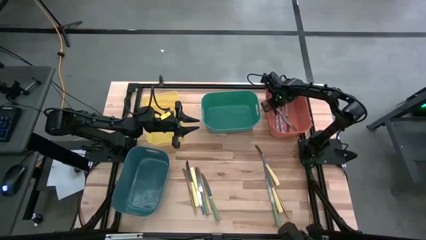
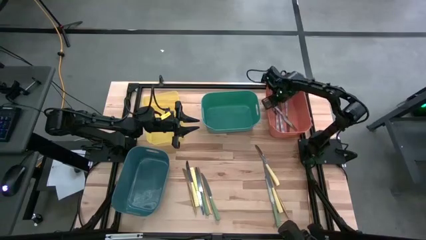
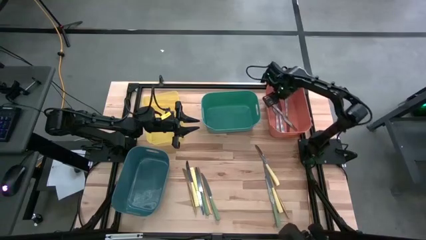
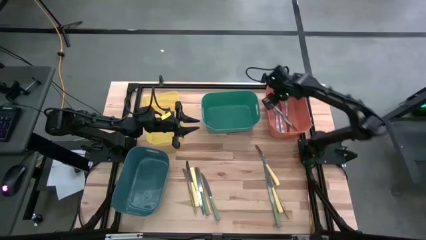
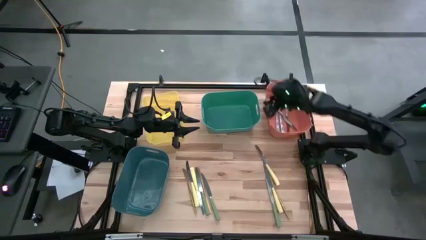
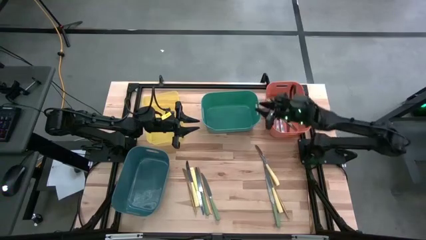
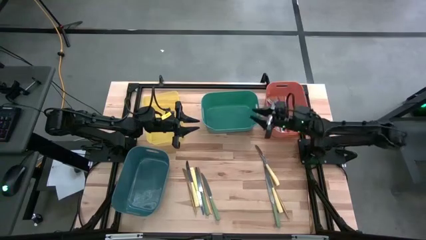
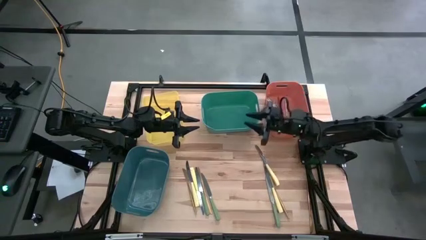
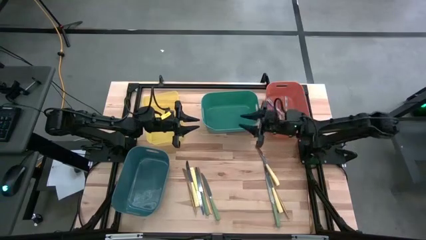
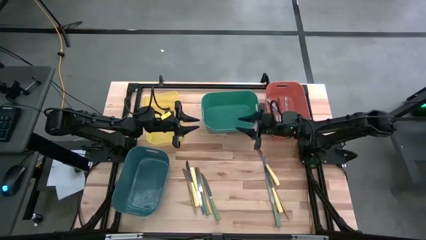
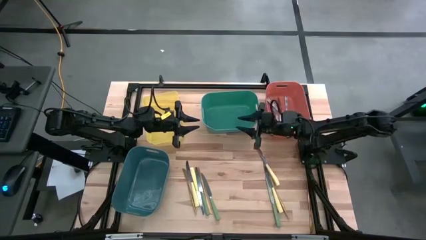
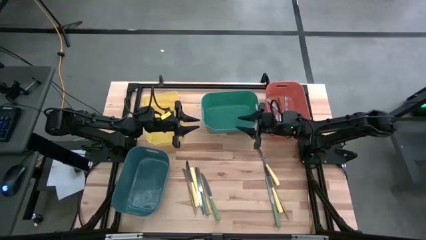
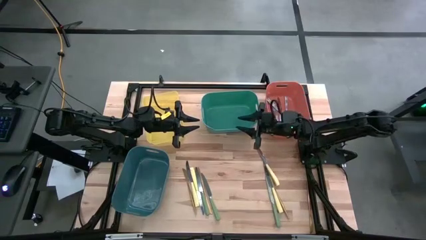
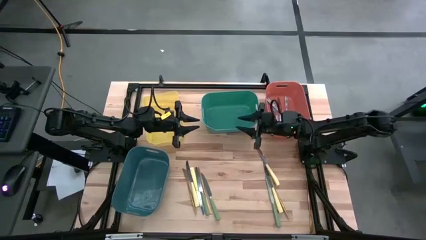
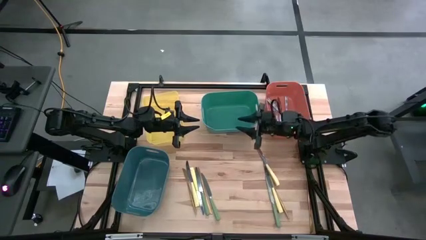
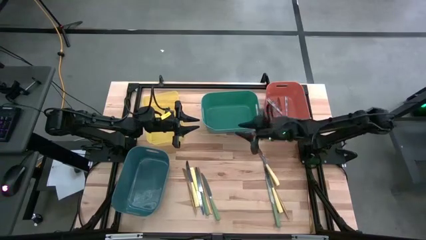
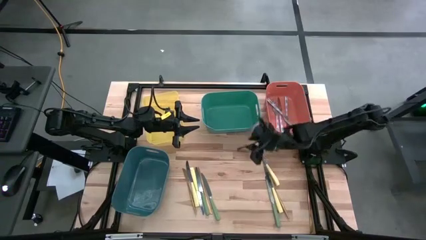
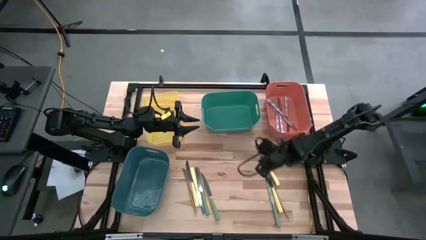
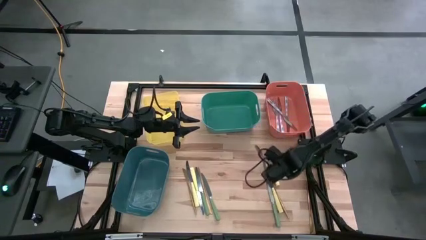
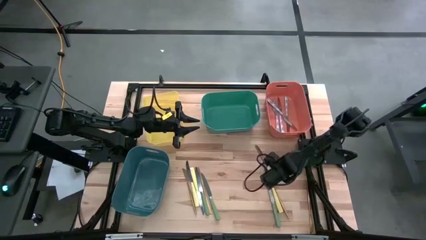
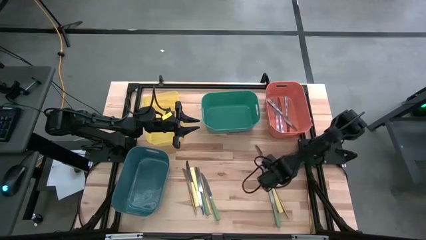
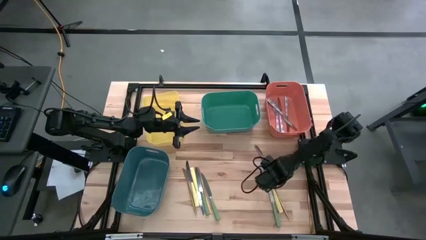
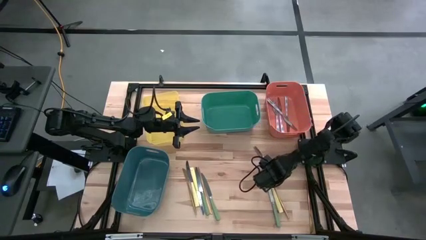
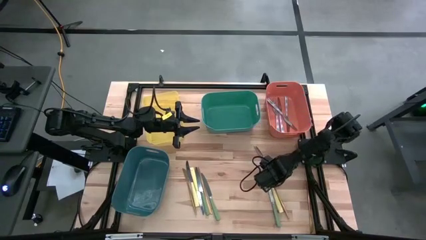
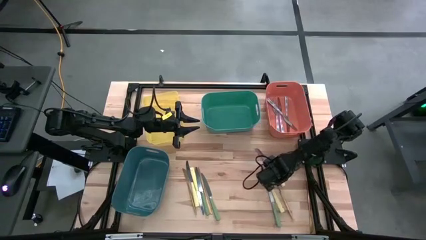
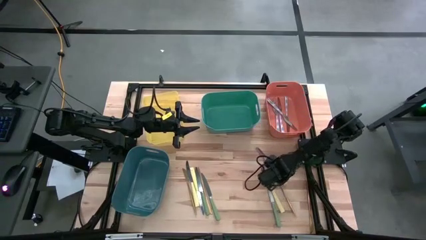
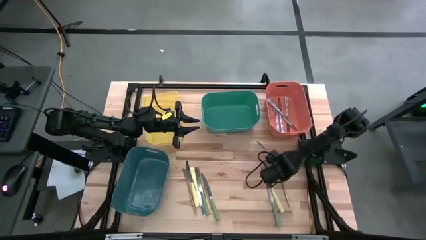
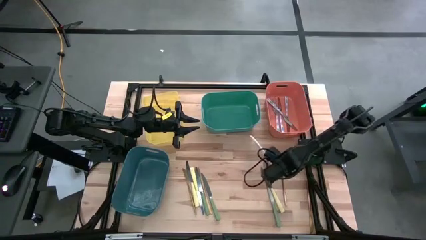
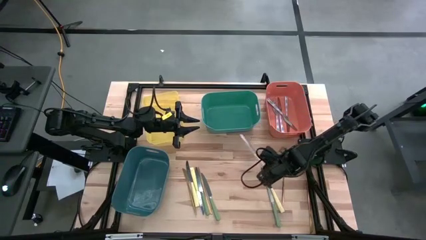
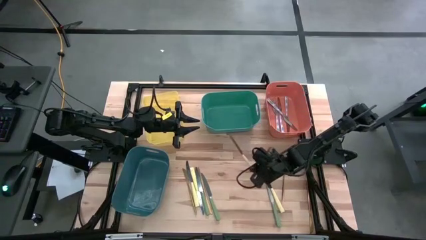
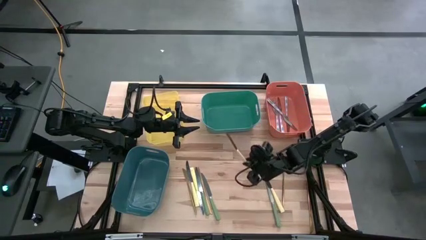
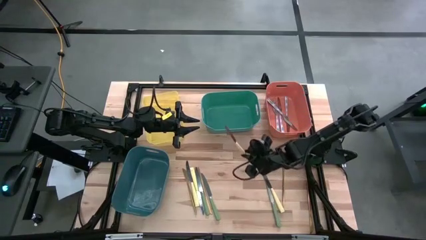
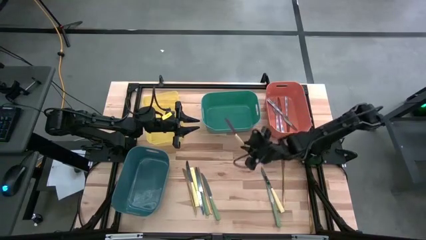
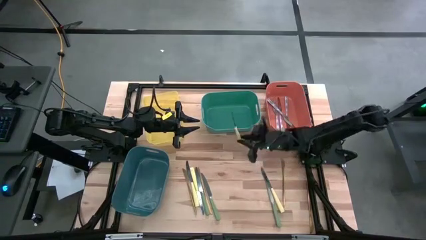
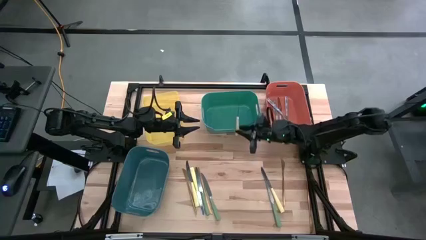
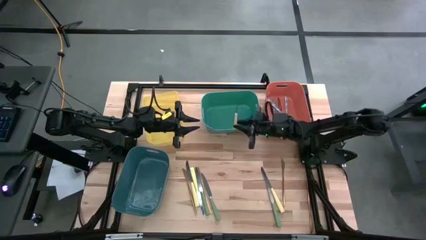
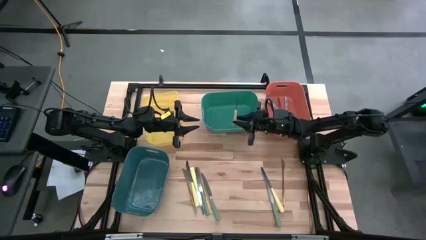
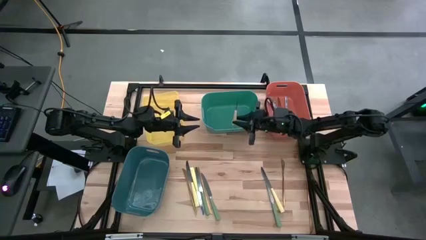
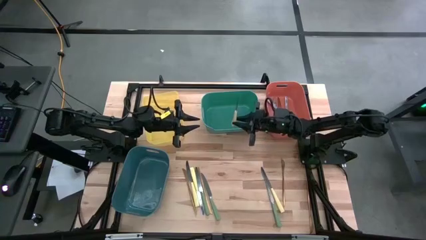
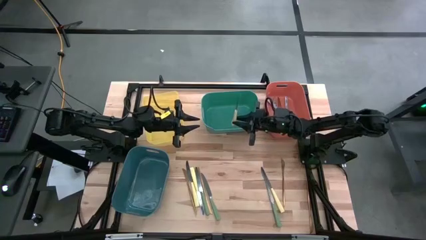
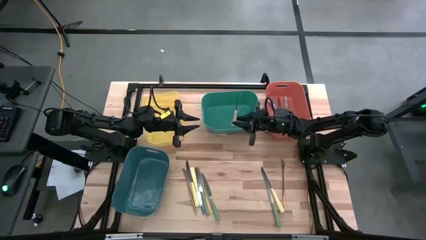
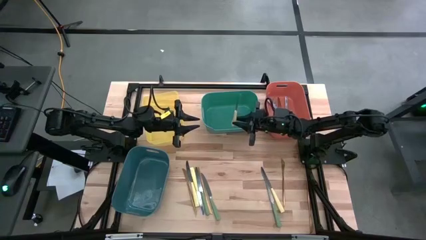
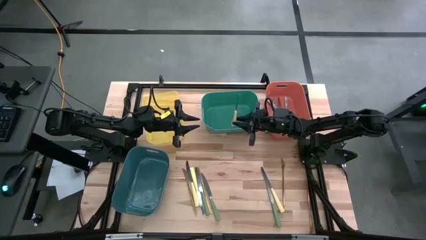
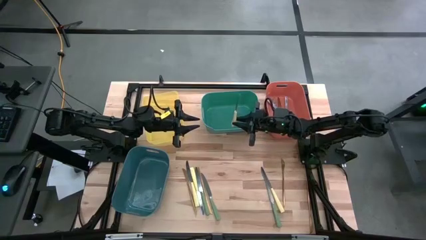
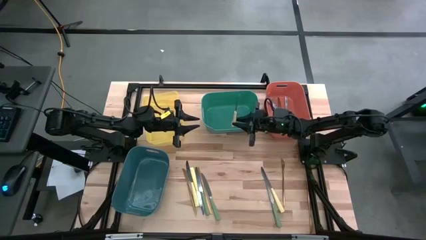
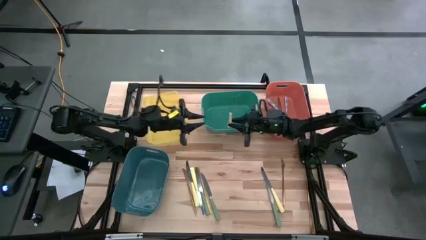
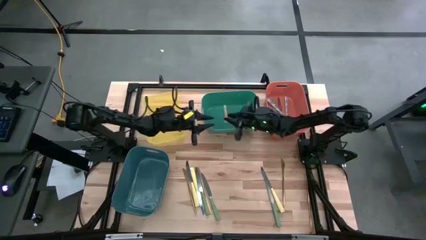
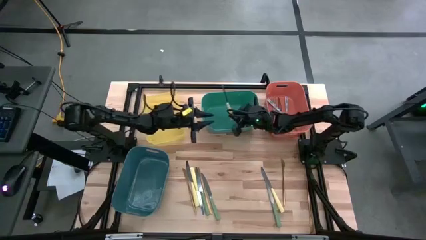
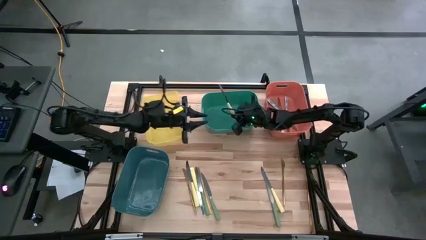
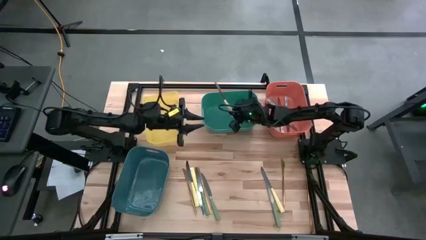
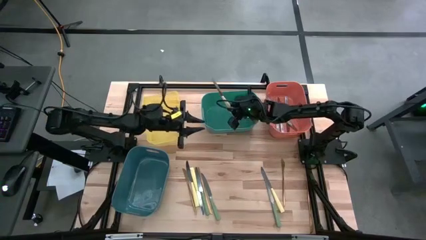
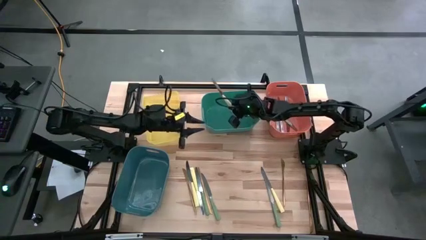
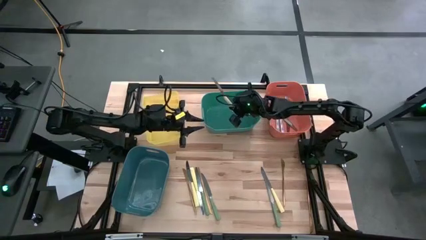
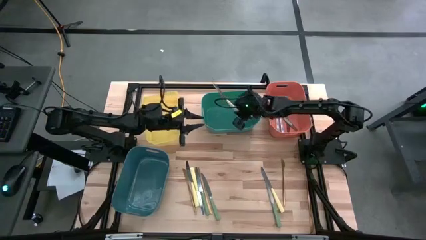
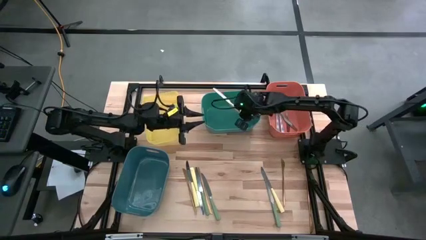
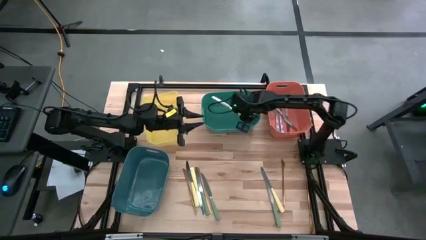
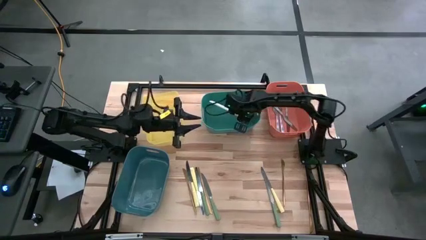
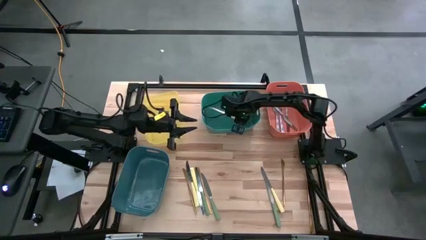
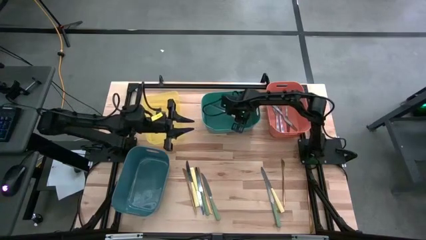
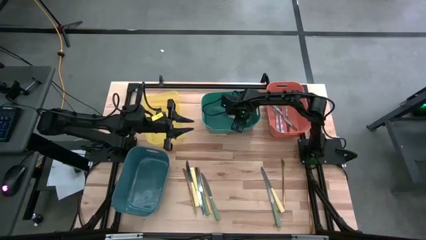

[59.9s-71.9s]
Task: Sort silverware by color (type)
Put the yellow knife into the green bin
